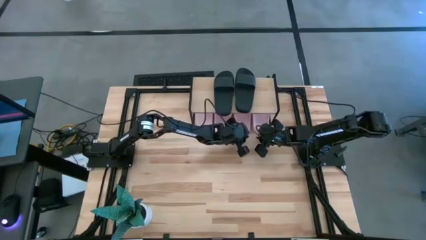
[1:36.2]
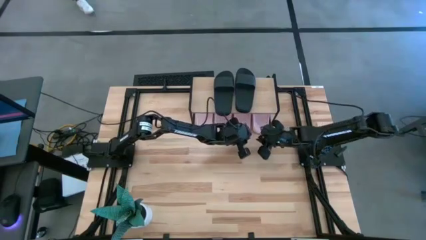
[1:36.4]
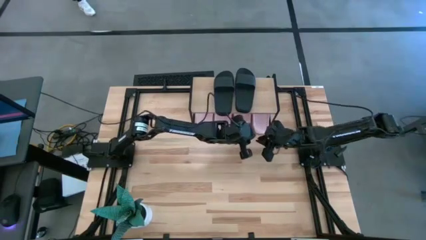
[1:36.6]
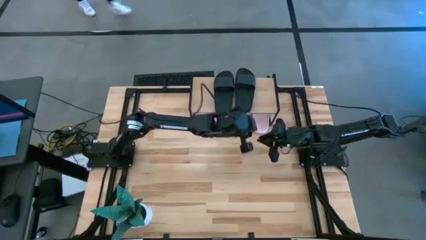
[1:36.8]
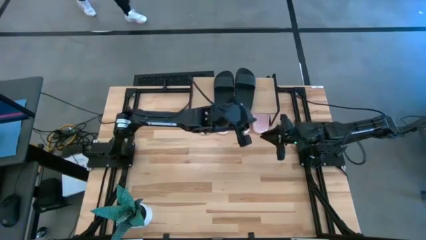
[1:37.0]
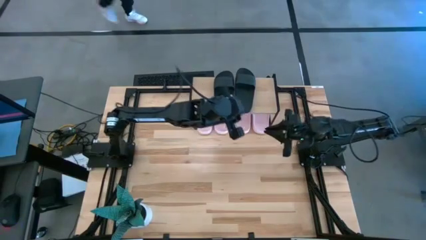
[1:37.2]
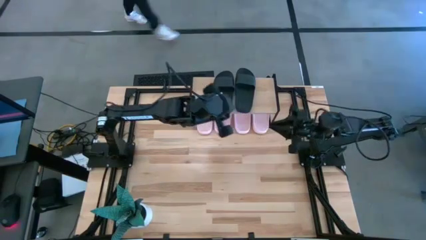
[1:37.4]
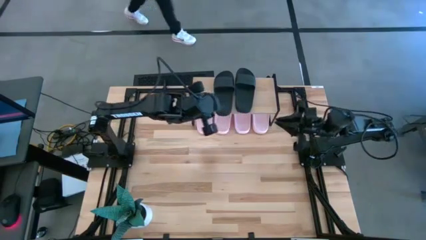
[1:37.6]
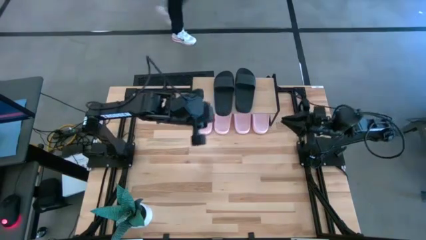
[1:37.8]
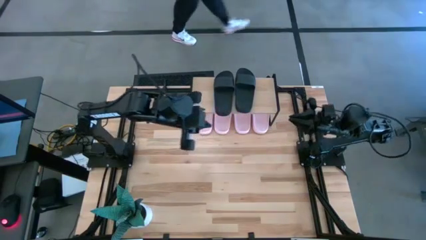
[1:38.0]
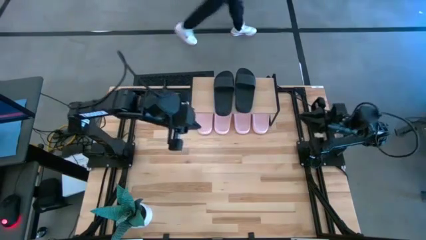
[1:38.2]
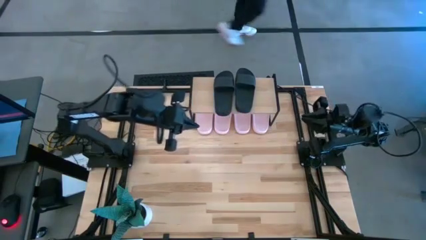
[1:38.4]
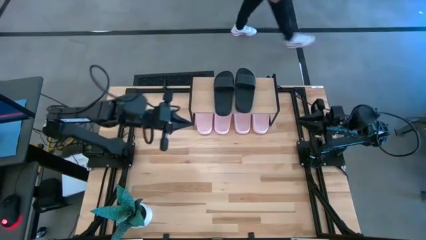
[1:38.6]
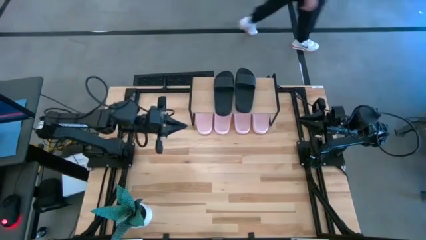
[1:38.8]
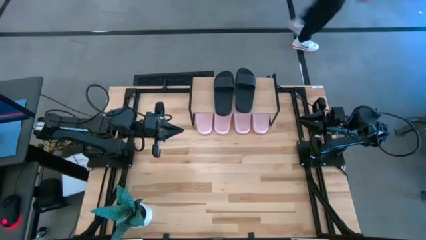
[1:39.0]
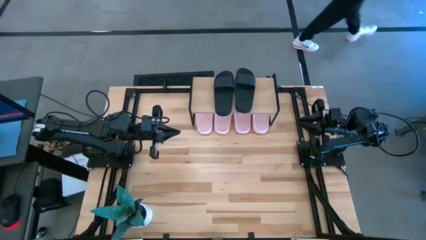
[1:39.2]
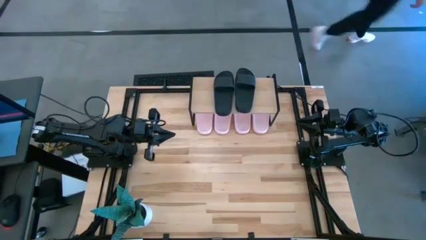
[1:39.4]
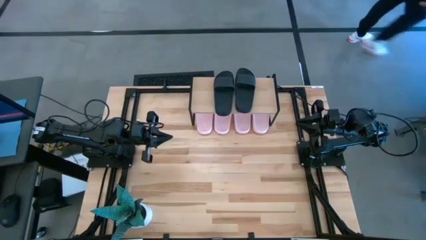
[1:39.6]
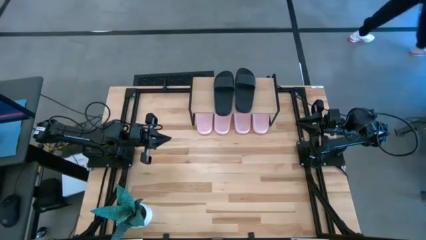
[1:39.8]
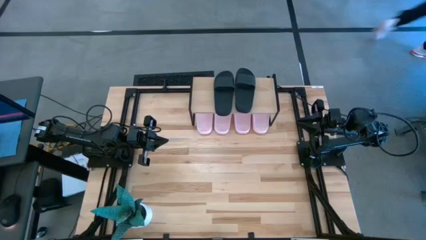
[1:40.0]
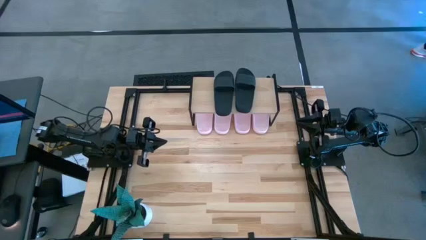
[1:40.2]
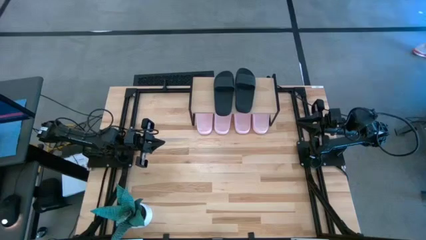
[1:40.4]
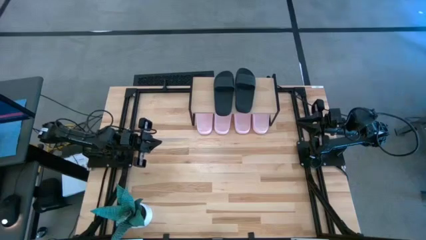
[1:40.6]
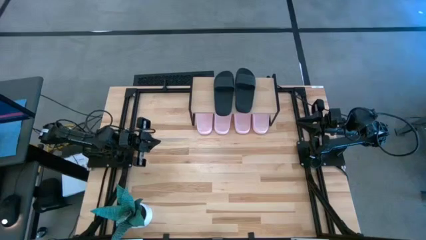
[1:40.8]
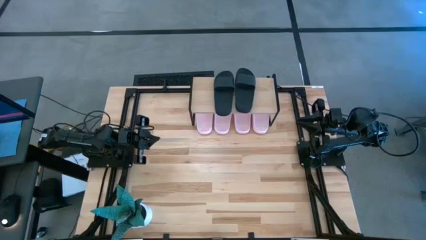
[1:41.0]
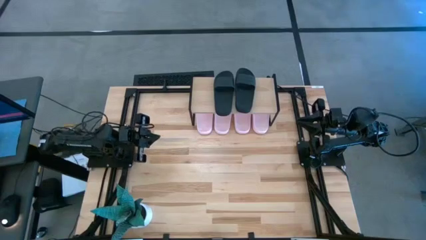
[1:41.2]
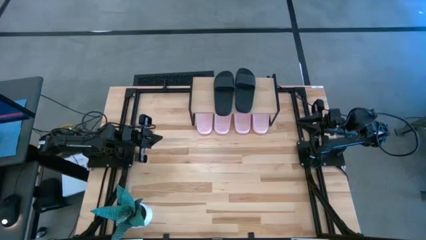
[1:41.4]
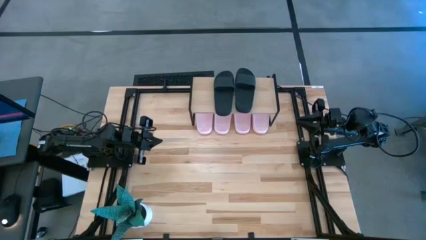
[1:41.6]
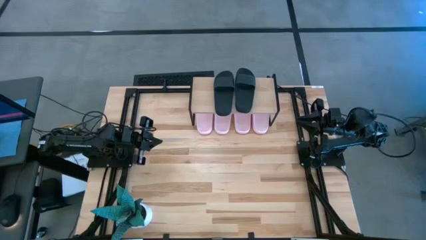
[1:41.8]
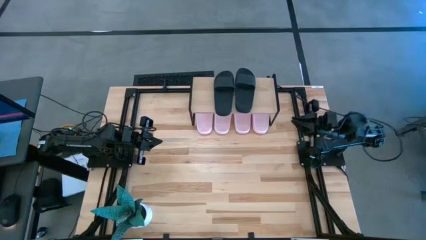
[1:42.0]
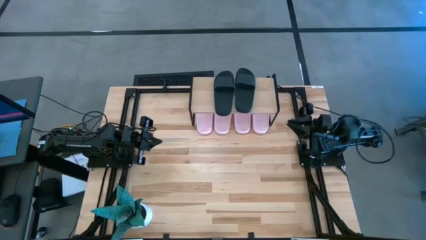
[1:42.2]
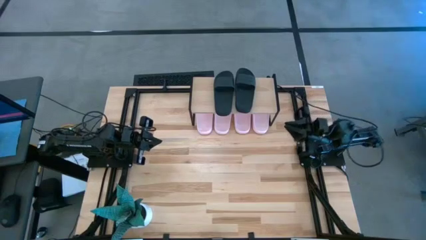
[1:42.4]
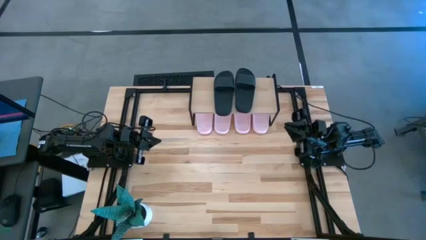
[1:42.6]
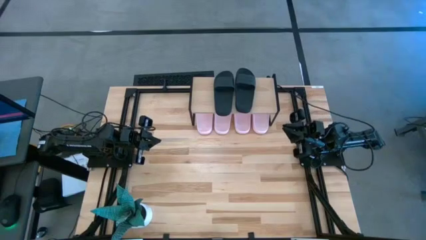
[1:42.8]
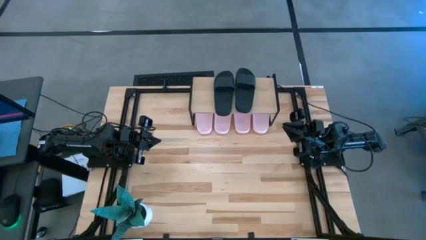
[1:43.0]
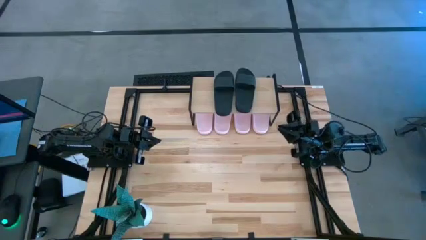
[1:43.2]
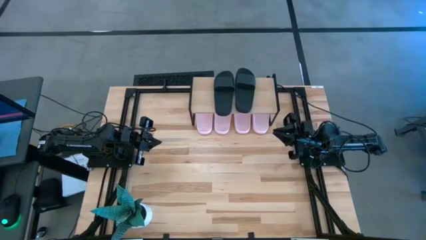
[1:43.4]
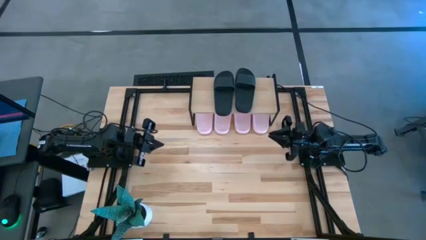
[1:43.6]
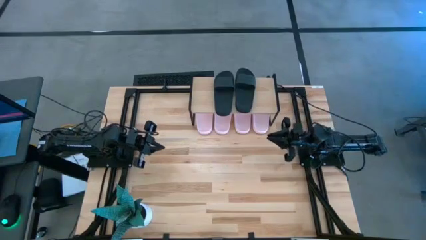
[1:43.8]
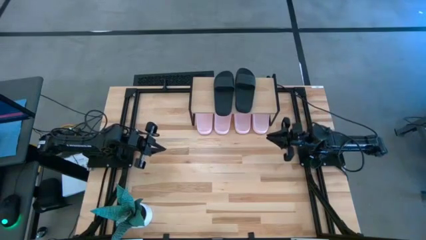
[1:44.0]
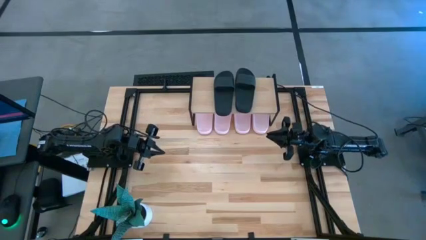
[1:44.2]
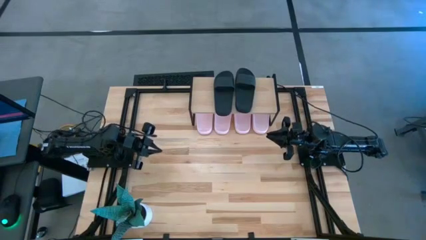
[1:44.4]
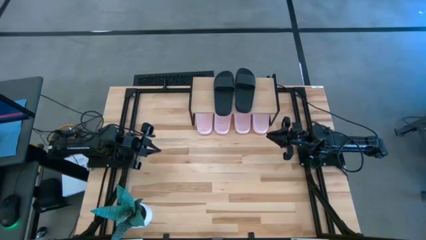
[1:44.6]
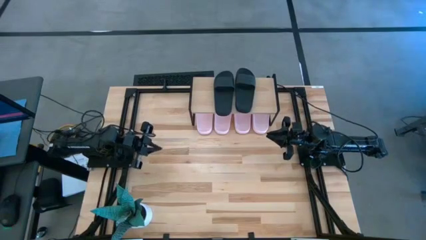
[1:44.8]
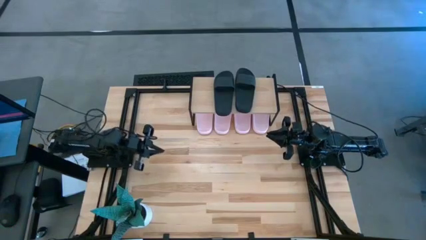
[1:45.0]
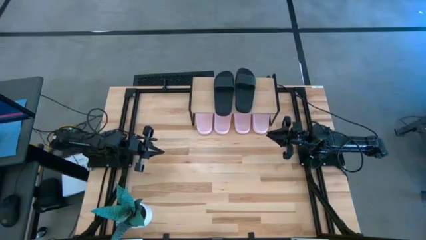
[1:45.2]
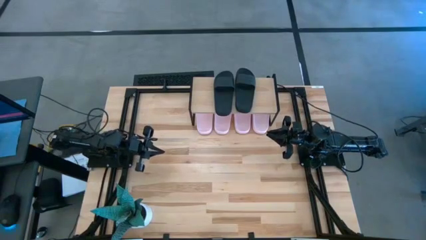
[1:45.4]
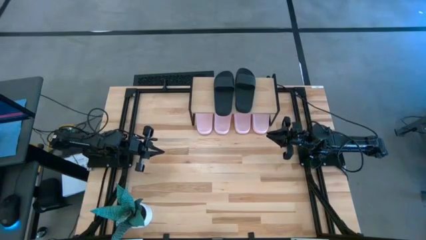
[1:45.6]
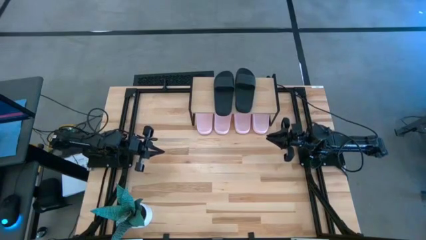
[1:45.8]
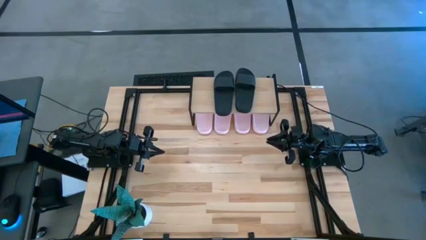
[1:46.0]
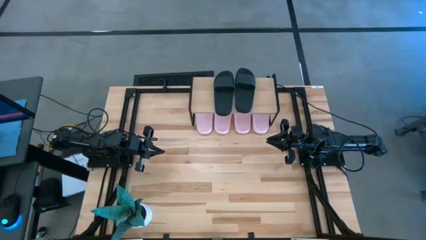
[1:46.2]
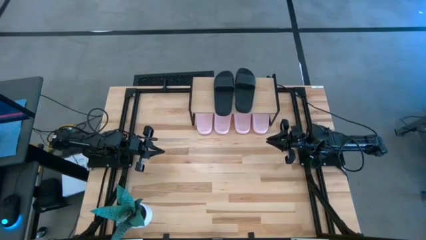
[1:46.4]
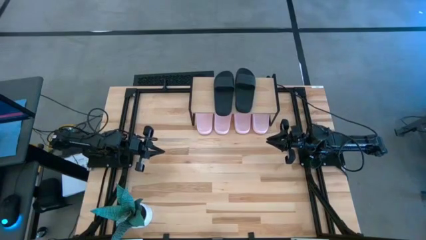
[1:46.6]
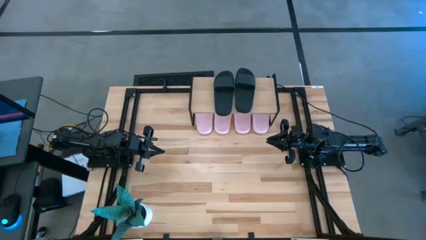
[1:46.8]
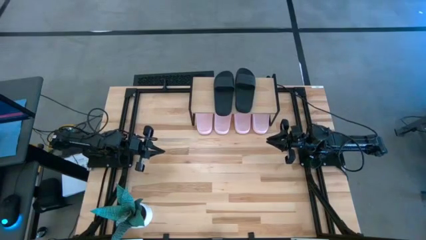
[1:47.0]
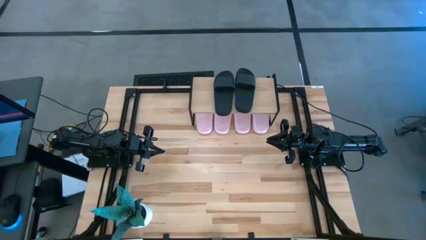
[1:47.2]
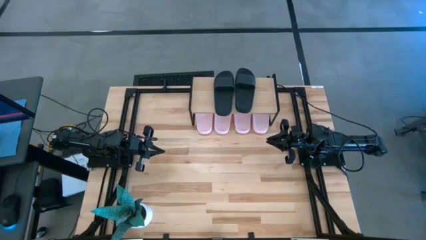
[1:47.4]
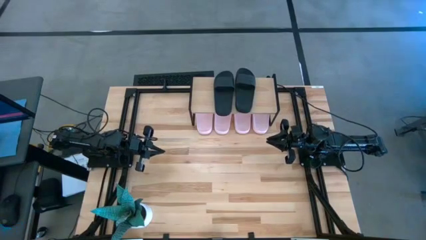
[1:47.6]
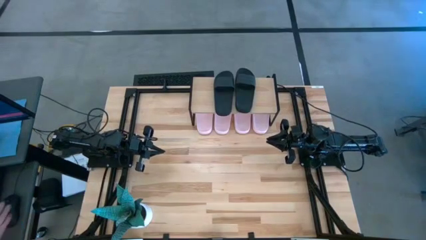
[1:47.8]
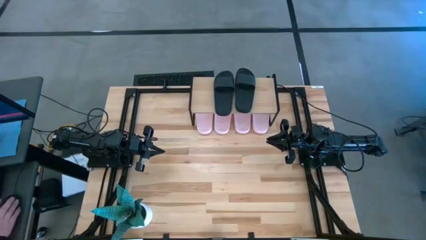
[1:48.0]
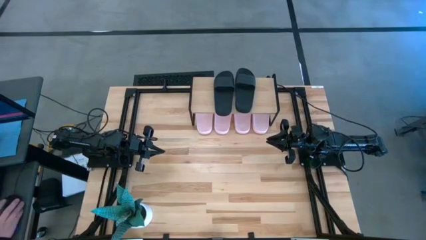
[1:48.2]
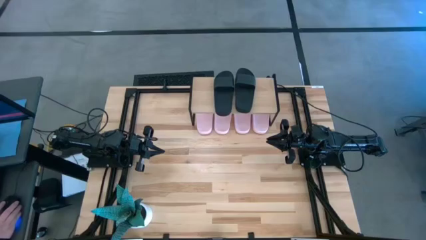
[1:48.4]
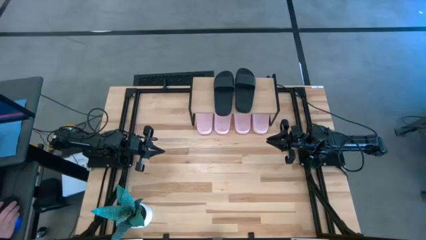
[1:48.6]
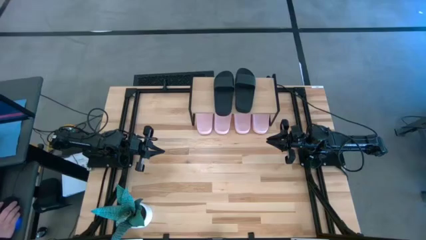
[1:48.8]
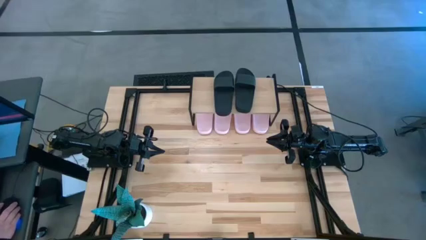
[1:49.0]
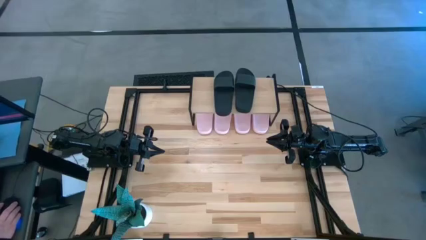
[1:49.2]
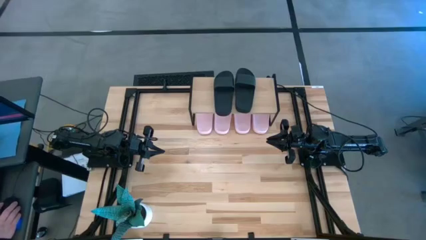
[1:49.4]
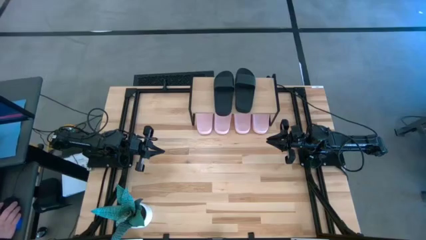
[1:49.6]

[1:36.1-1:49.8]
Task: Pick and place slides into the shelf
Return to Home Position

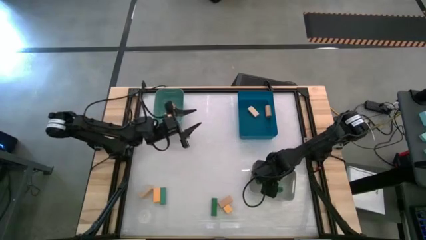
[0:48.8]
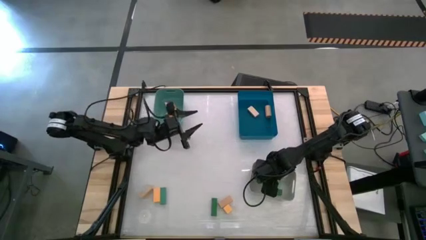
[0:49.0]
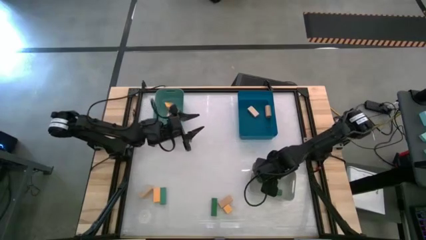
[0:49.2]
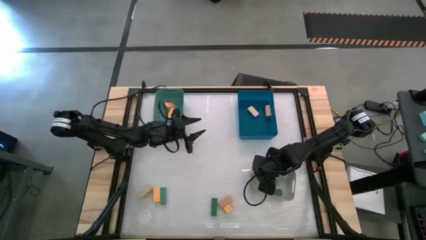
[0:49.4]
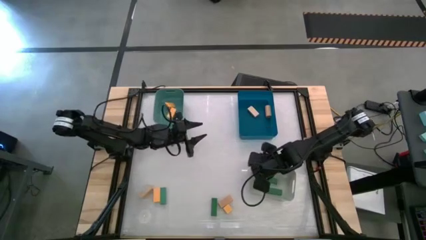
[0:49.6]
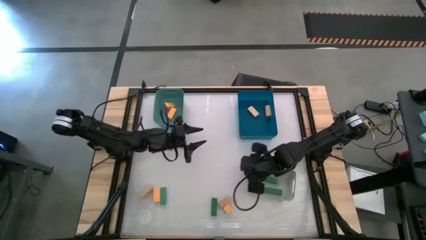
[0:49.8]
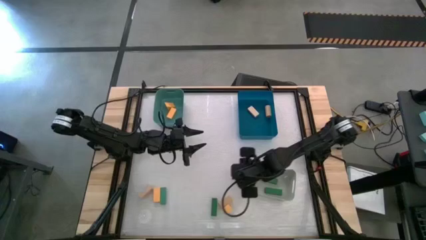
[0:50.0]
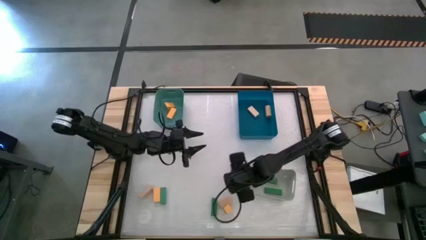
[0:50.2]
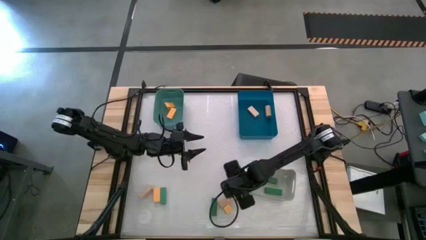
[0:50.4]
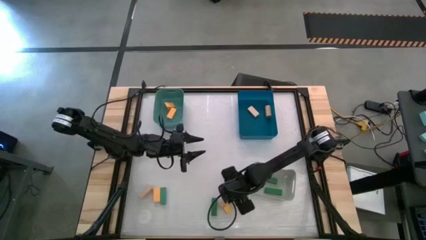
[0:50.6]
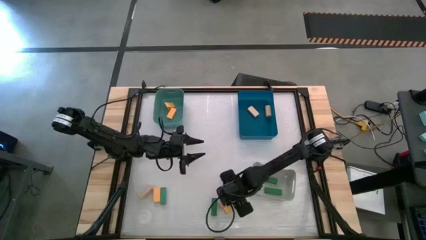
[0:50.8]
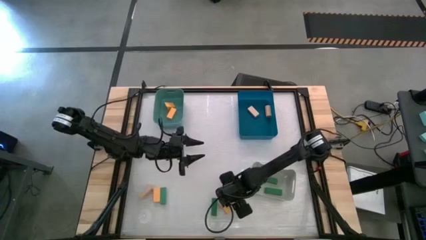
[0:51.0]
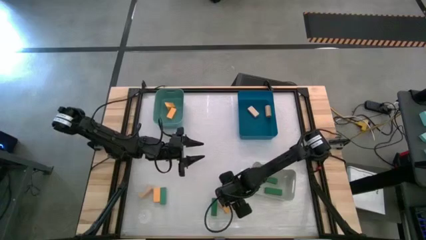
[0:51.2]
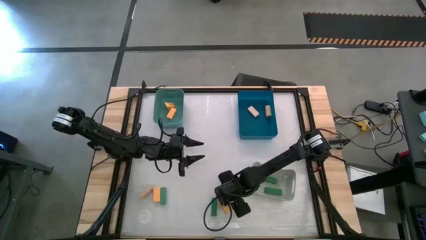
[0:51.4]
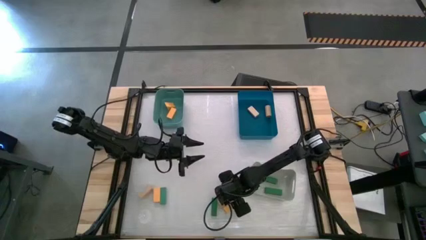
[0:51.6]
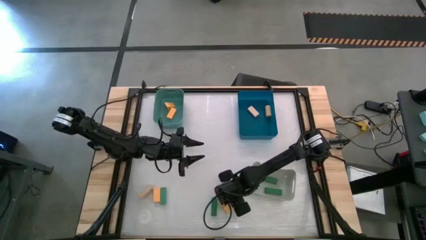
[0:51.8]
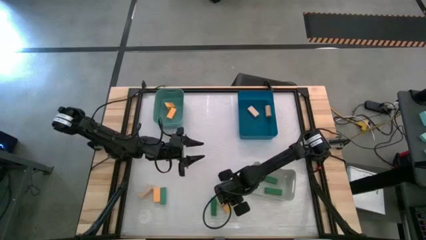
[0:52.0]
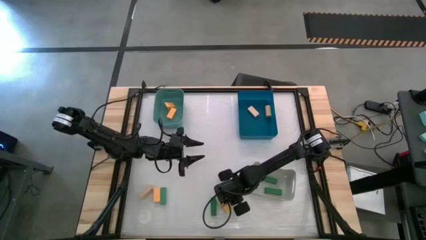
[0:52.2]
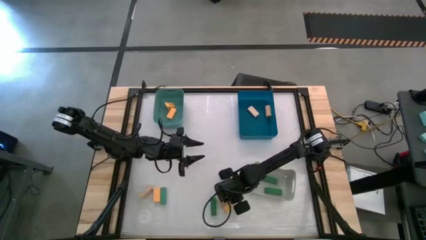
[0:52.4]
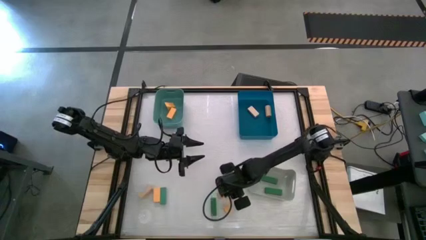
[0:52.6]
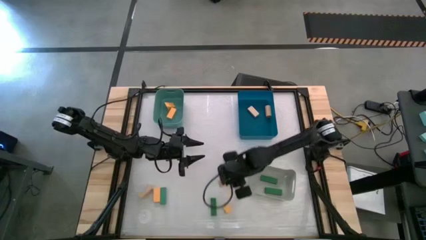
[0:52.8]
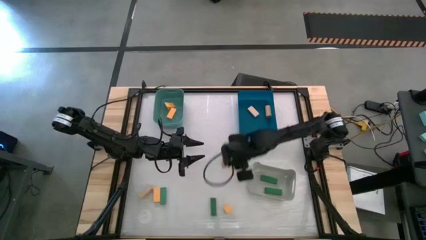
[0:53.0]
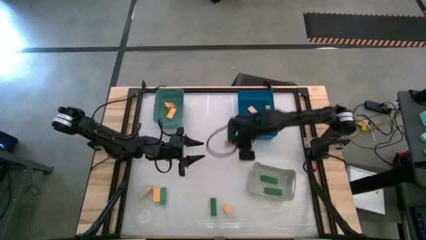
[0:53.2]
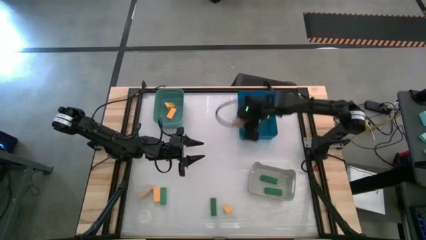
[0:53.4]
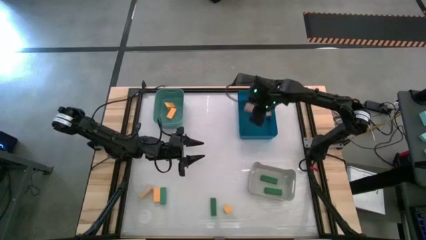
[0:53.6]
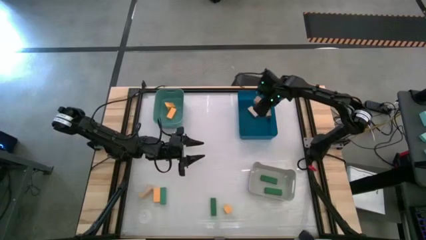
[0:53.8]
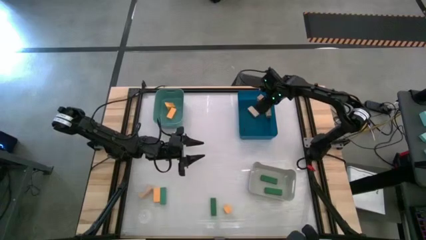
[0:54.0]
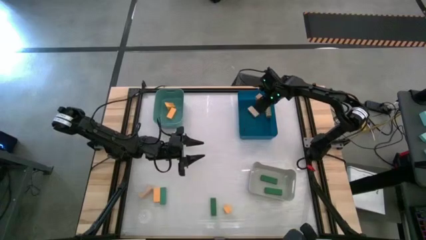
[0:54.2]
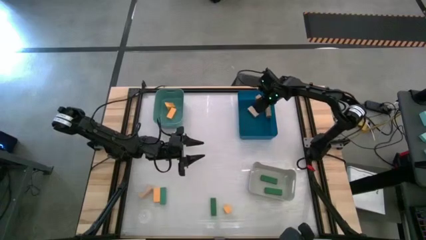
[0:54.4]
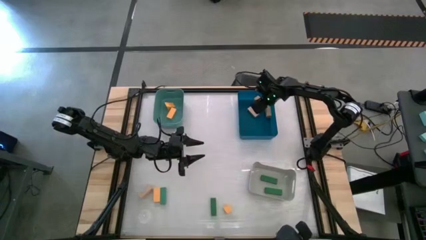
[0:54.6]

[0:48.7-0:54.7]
Task: Sort & place blocks by color
Put the brown wooden block into the dark blue bin
